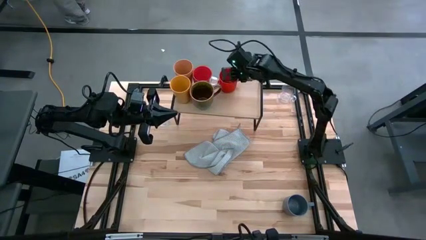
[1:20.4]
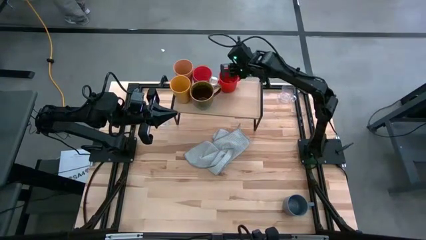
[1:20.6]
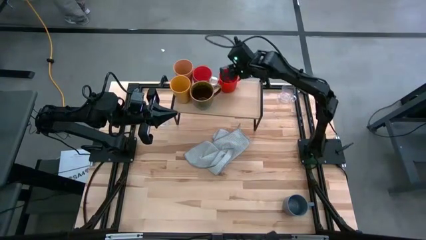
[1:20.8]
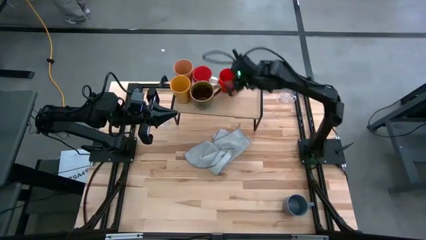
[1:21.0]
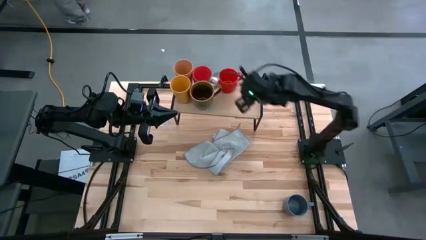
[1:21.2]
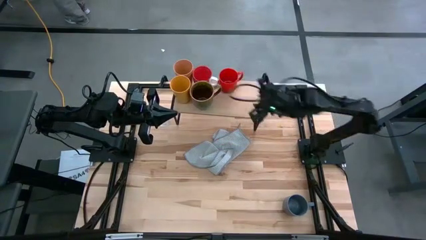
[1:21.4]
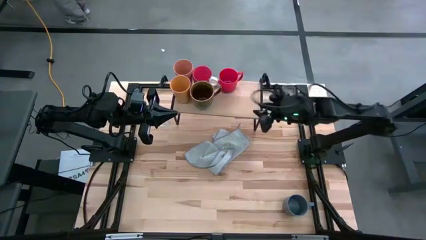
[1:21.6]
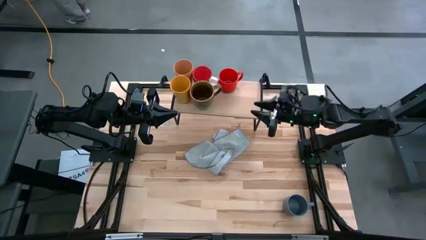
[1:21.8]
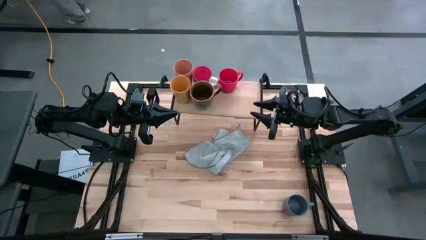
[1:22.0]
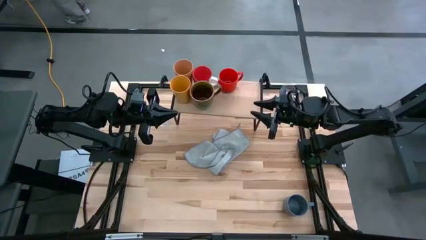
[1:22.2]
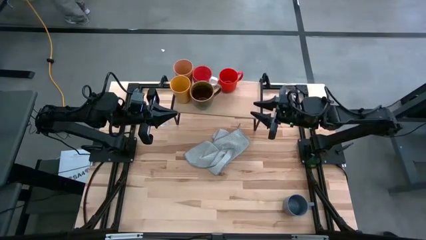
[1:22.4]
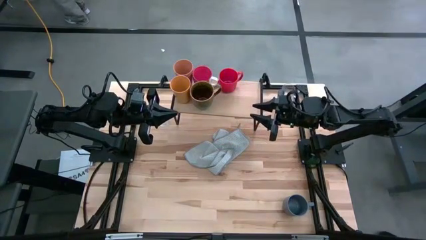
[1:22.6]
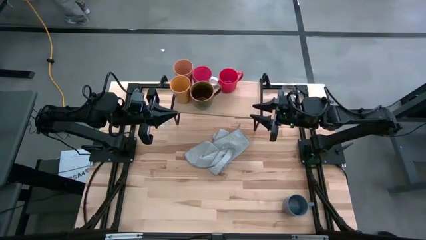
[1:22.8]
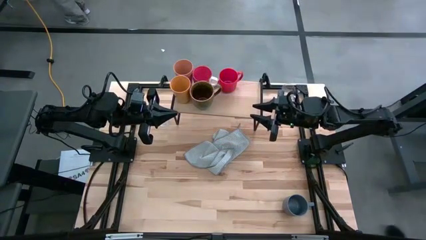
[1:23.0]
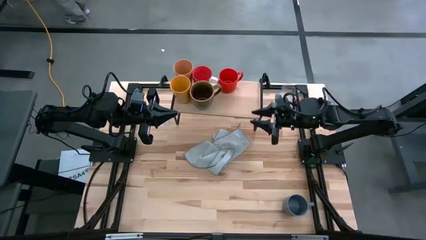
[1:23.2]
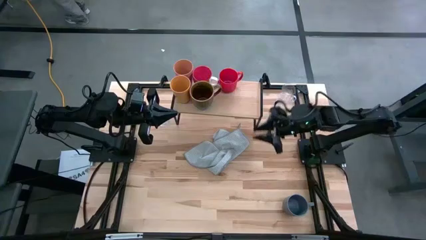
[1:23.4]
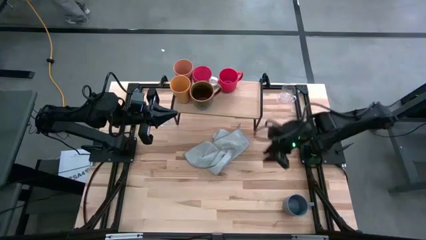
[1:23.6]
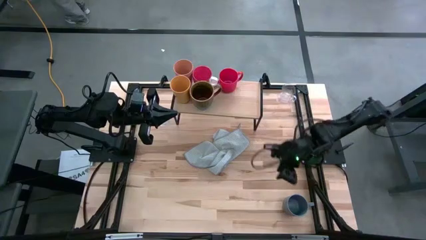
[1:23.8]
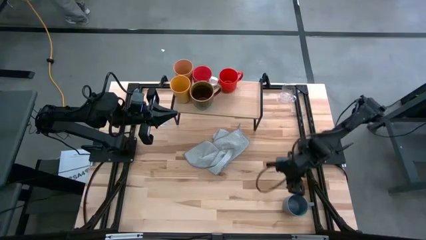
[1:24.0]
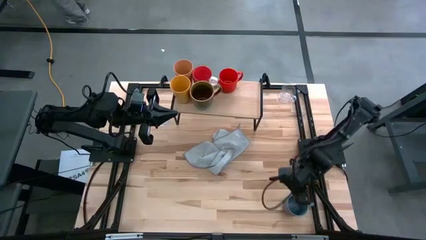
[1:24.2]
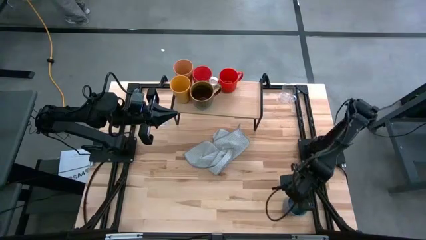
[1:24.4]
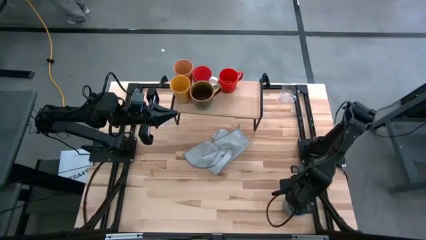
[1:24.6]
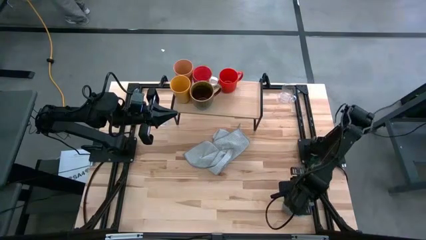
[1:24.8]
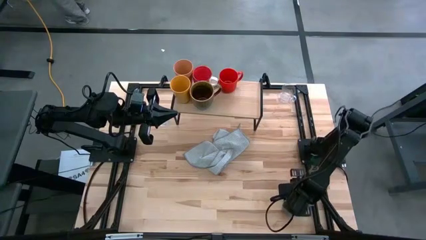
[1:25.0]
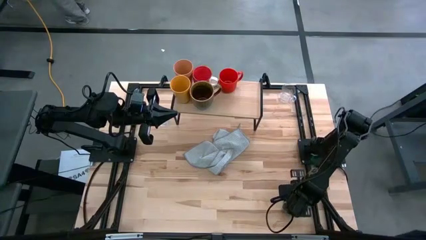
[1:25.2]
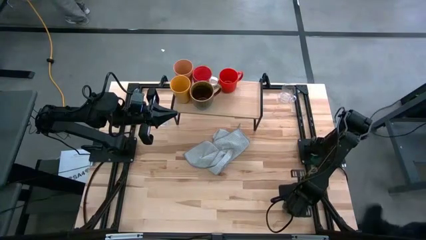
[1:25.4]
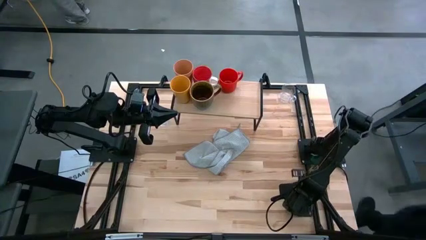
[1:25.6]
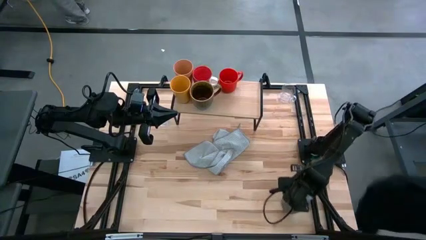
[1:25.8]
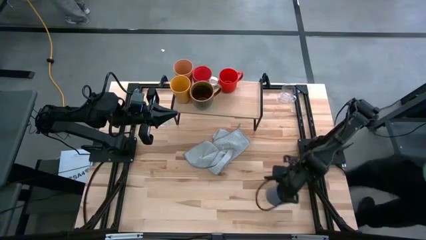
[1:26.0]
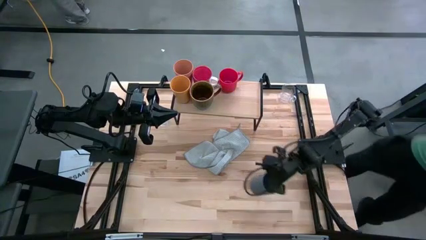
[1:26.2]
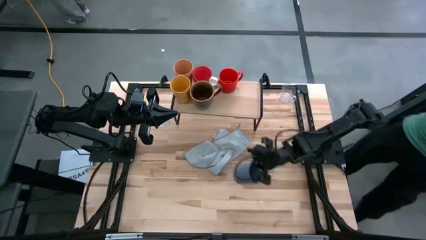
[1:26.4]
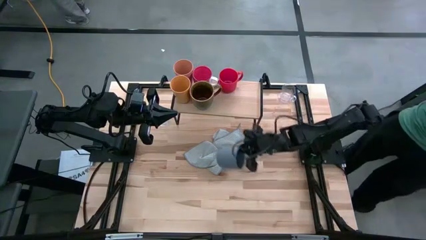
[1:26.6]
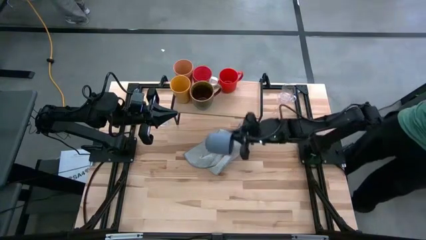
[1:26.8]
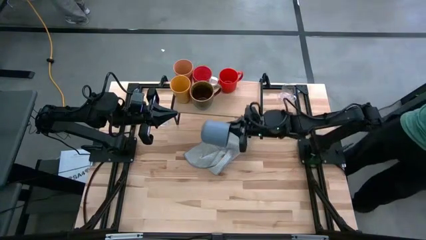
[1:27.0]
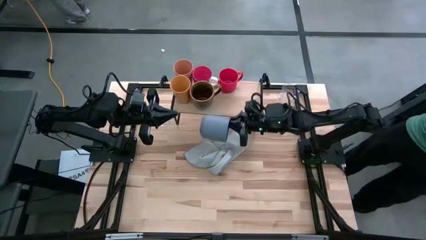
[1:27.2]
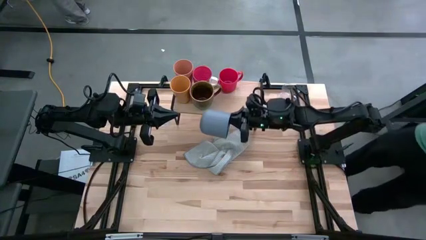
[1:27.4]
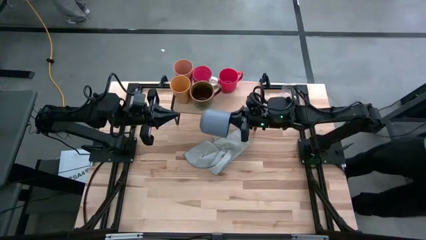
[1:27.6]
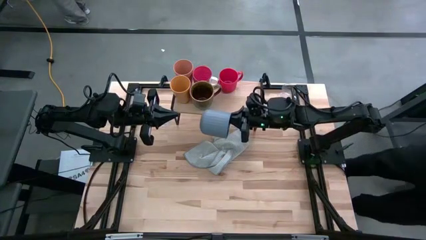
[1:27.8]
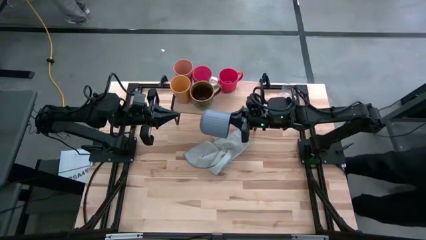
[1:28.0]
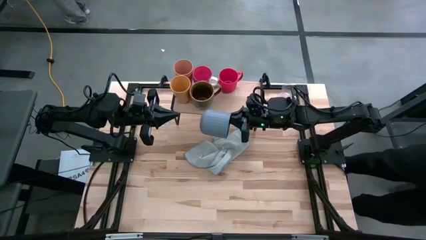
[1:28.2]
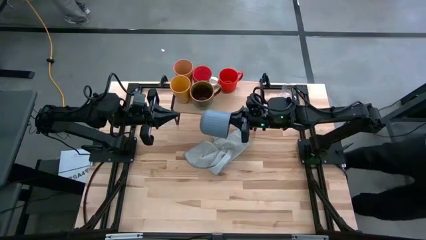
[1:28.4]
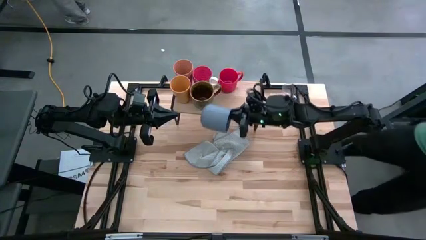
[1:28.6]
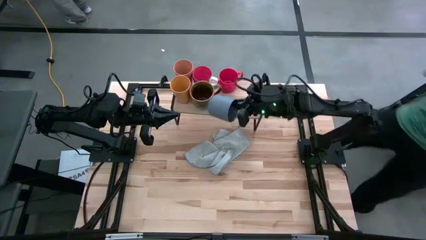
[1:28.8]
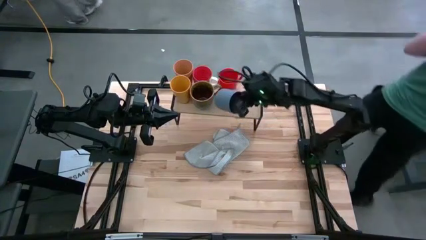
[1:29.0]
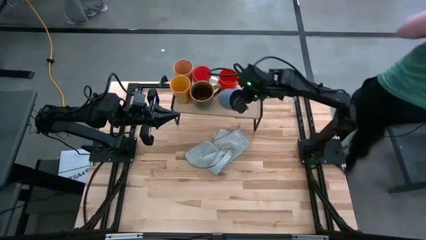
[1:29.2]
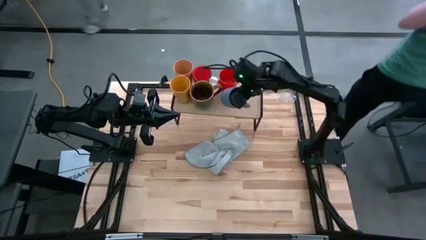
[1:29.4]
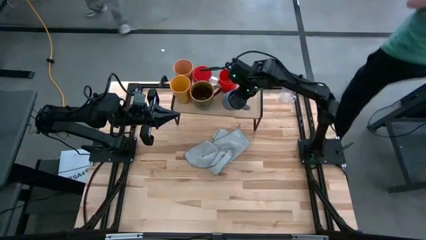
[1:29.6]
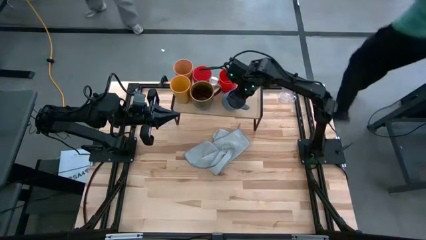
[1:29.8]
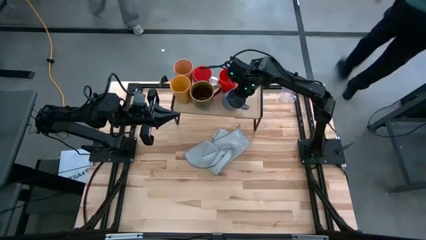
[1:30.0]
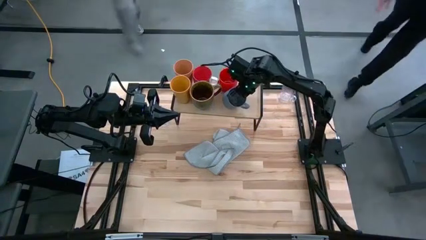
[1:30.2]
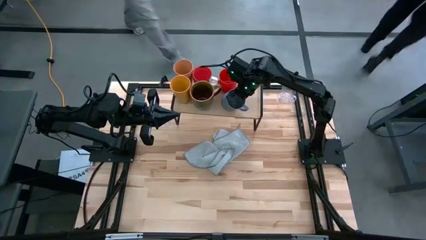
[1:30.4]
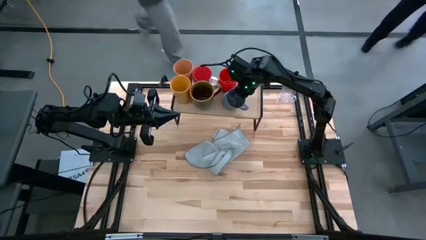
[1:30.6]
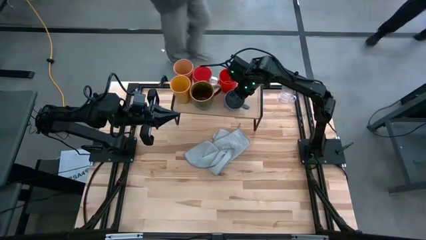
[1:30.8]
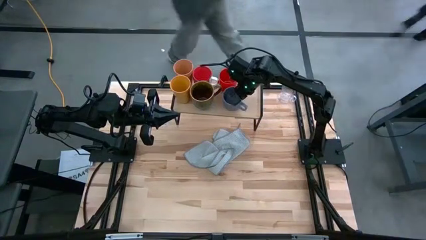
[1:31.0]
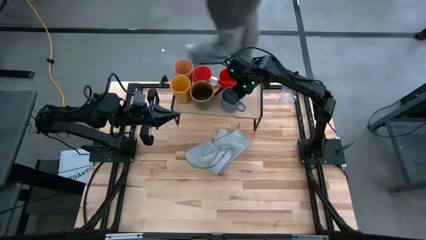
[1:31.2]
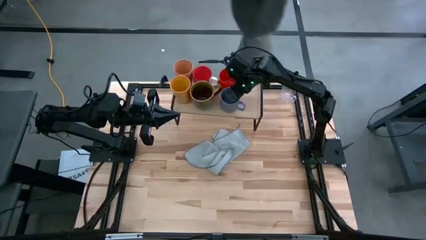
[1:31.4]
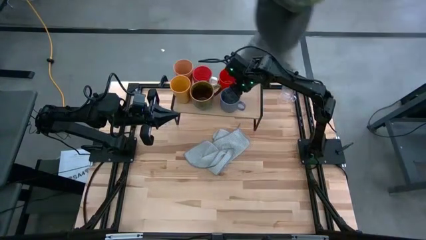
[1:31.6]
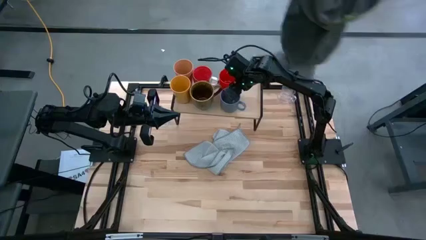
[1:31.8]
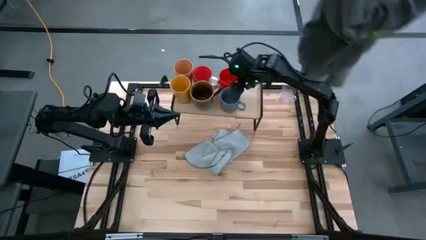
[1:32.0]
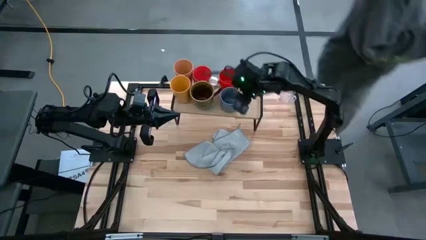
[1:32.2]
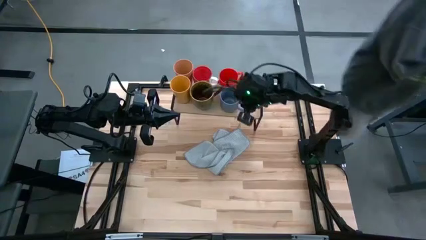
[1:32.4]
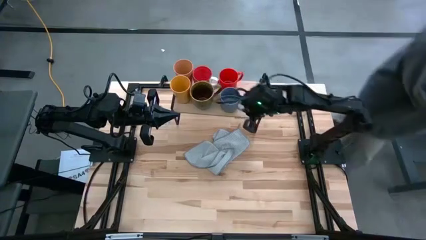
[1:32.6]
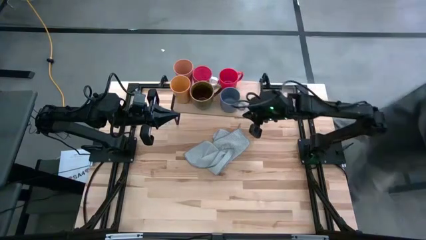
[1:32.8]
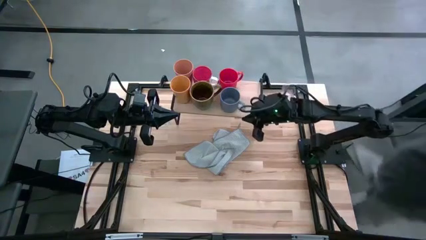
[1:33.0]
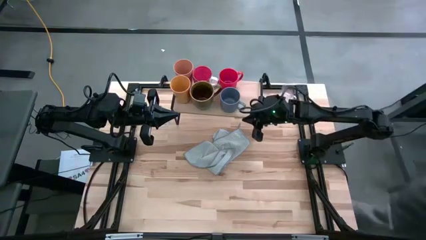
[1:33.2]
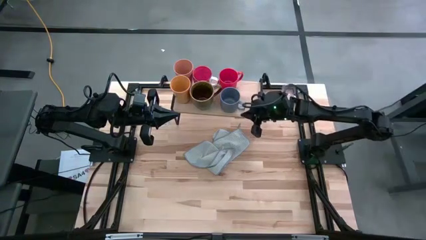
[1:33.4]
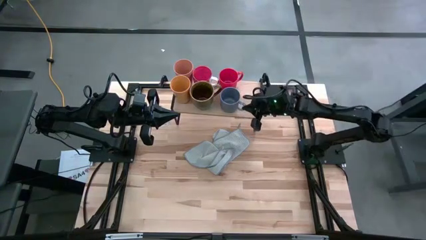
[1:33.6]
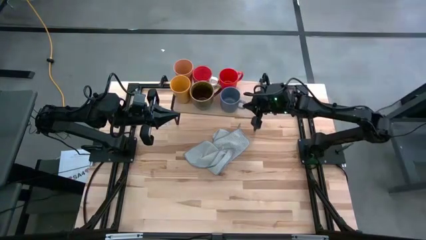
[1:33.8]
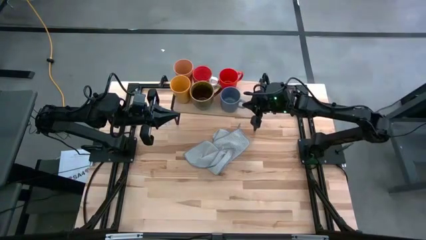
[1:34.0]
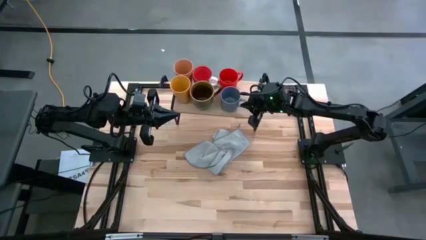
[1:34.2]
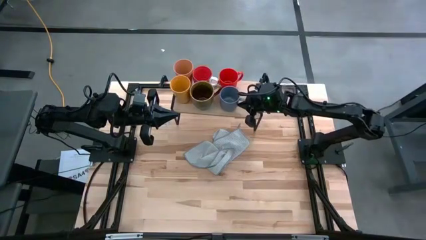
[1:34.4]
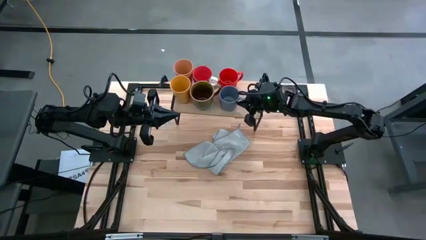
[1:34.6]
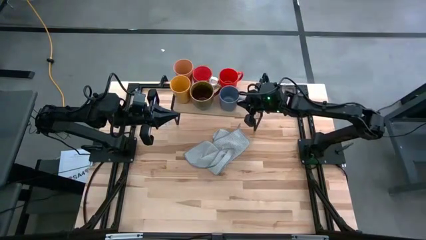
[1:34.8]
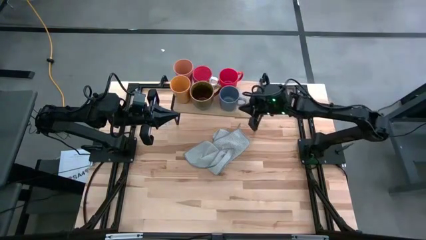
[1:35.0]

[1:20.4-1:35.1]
Task: Stack small to large cups/mugs on shelf
Put the light blue mug on the shelf
